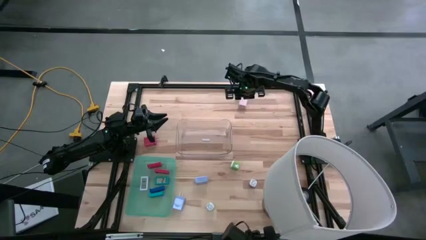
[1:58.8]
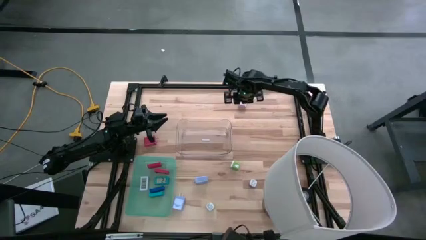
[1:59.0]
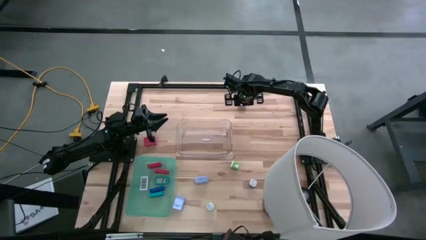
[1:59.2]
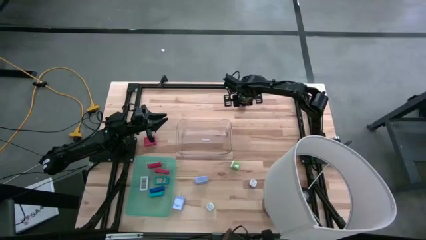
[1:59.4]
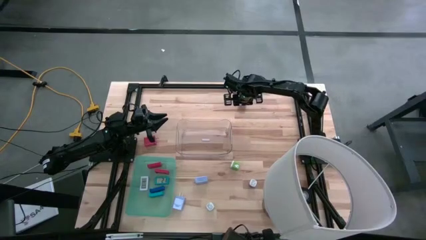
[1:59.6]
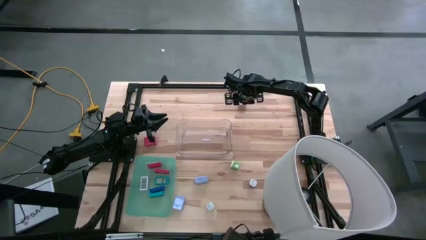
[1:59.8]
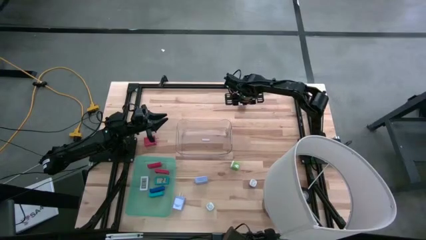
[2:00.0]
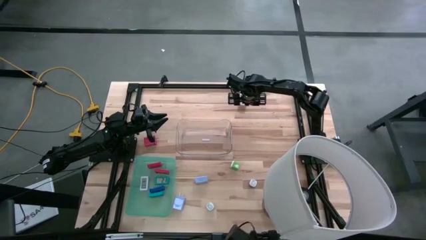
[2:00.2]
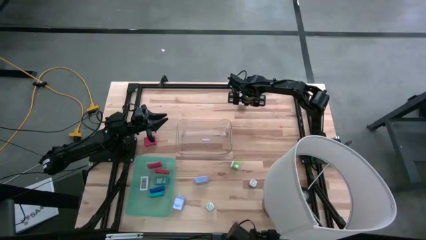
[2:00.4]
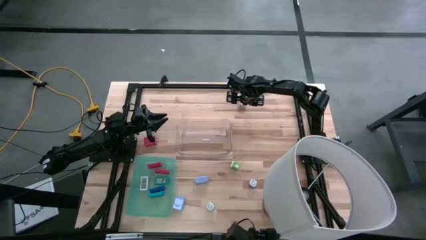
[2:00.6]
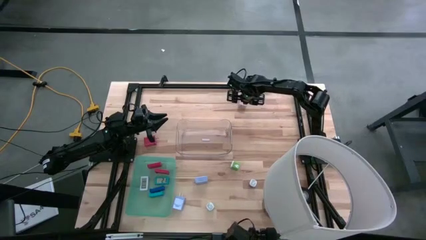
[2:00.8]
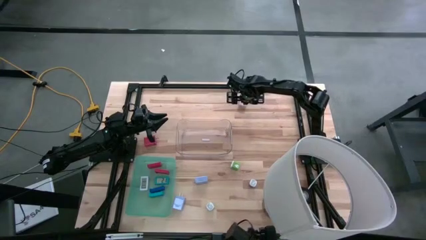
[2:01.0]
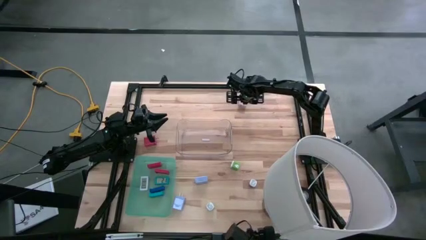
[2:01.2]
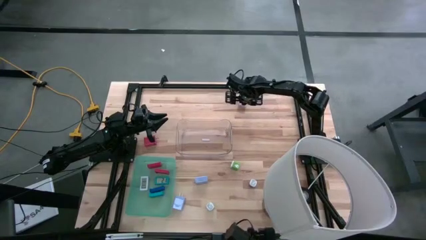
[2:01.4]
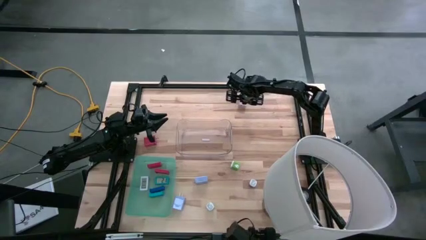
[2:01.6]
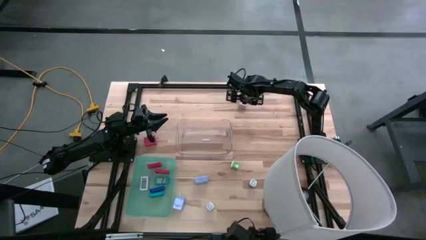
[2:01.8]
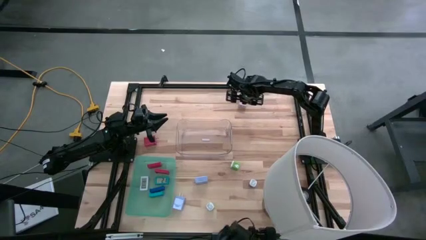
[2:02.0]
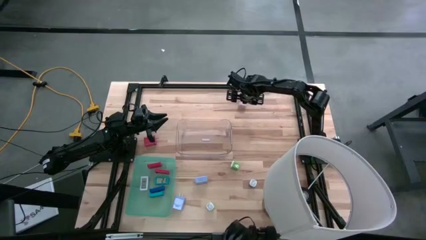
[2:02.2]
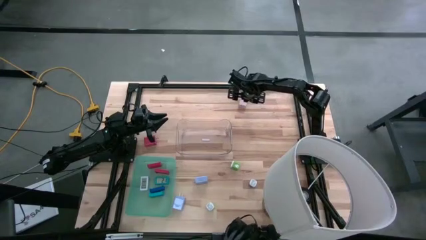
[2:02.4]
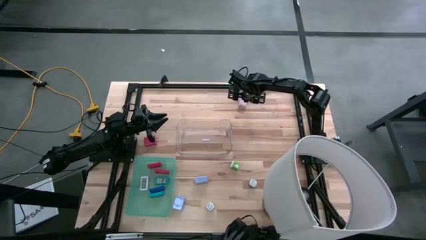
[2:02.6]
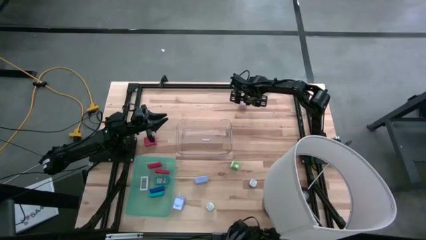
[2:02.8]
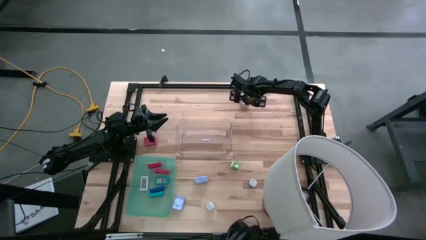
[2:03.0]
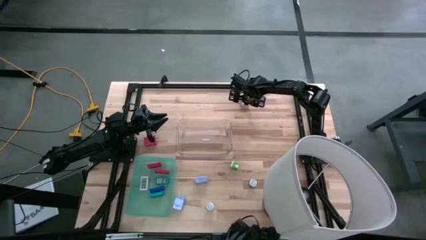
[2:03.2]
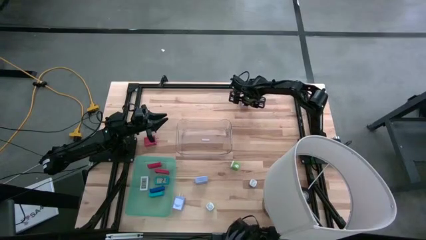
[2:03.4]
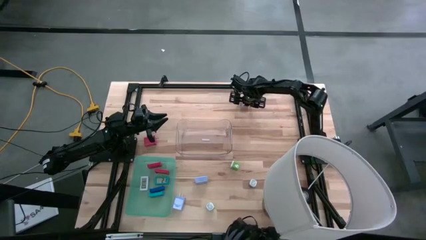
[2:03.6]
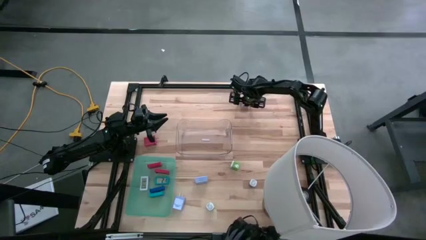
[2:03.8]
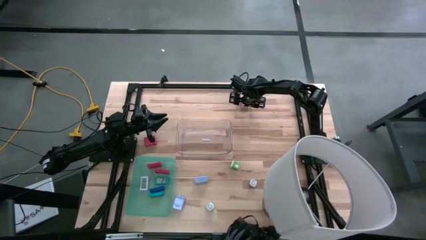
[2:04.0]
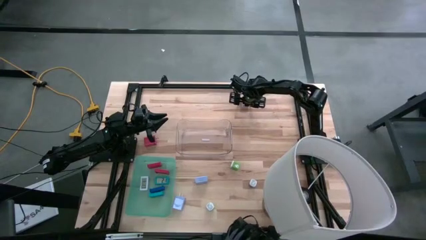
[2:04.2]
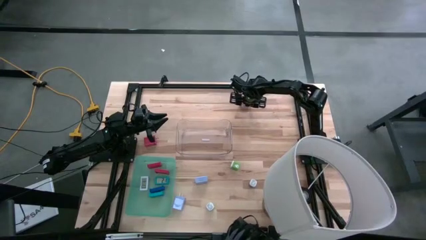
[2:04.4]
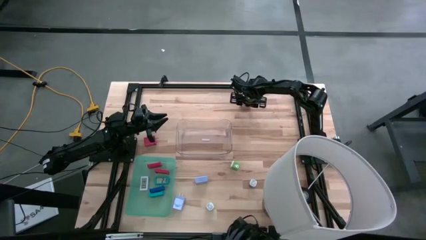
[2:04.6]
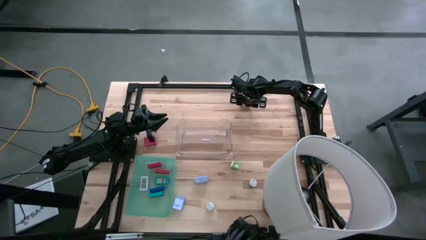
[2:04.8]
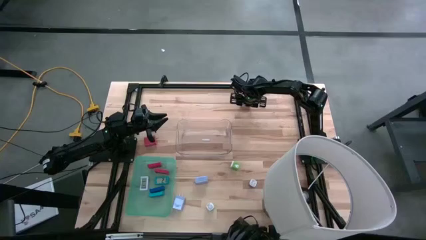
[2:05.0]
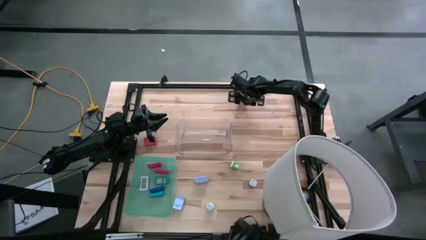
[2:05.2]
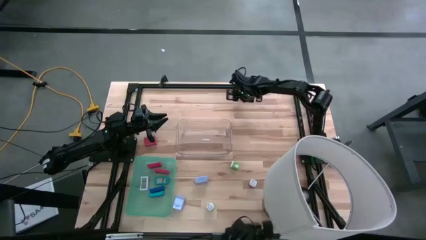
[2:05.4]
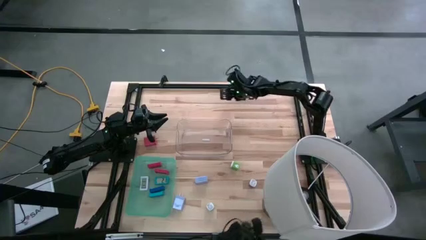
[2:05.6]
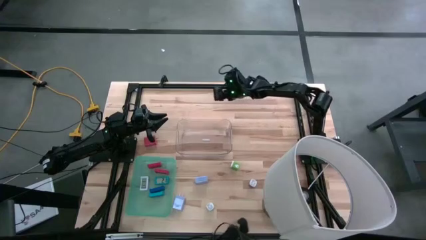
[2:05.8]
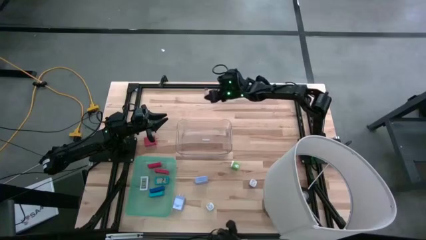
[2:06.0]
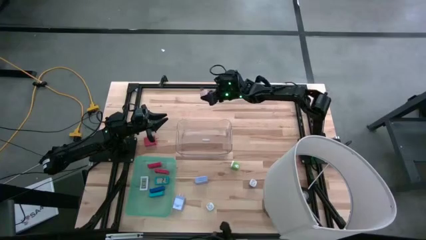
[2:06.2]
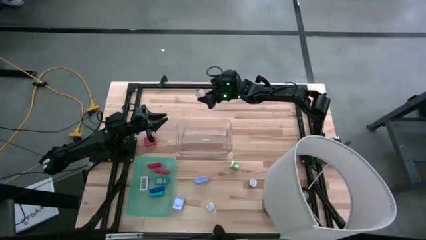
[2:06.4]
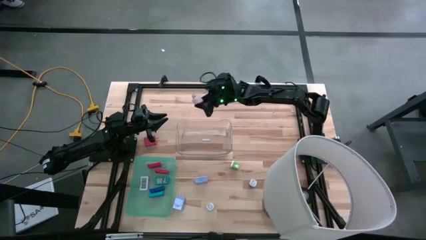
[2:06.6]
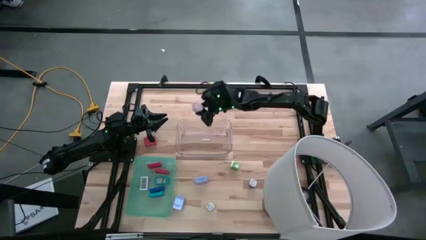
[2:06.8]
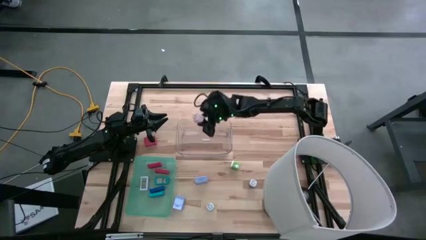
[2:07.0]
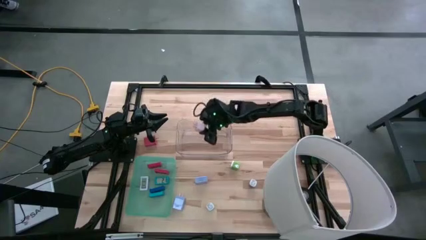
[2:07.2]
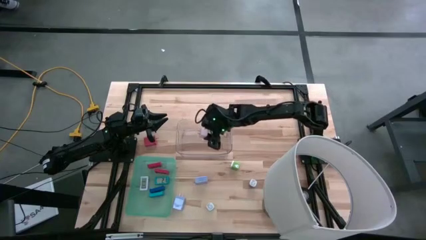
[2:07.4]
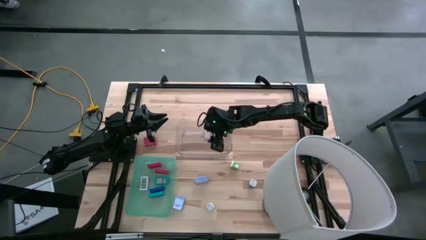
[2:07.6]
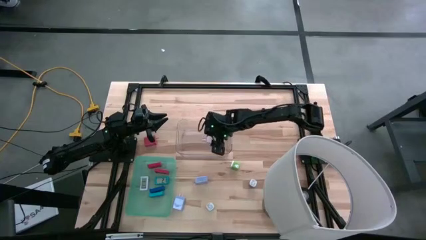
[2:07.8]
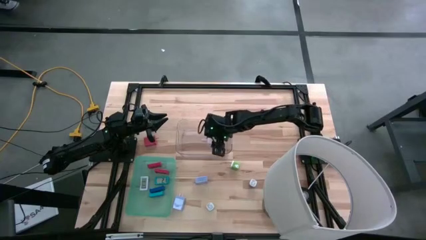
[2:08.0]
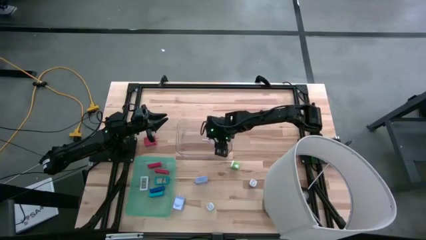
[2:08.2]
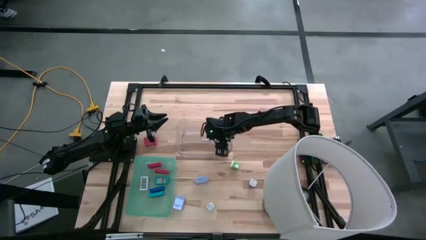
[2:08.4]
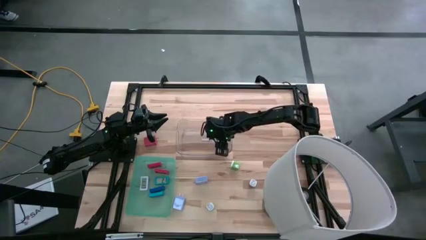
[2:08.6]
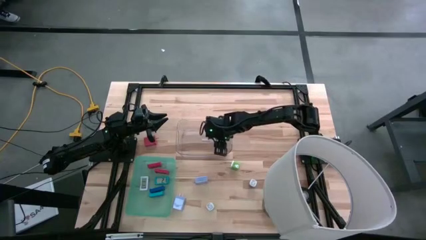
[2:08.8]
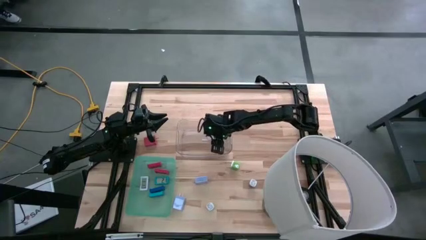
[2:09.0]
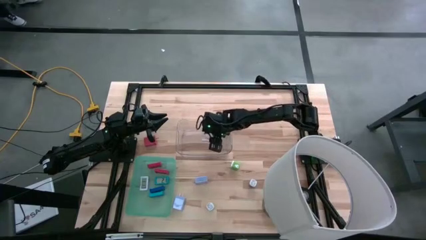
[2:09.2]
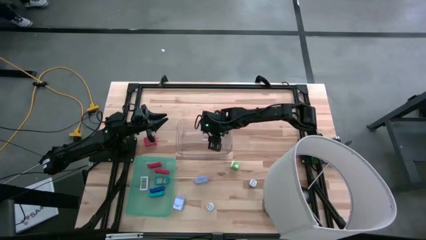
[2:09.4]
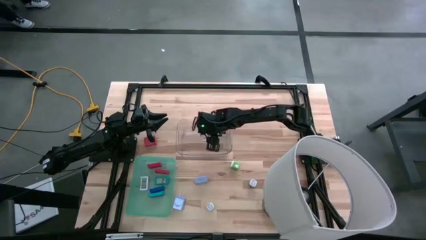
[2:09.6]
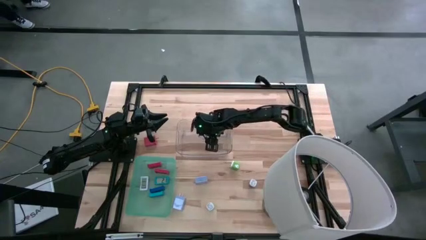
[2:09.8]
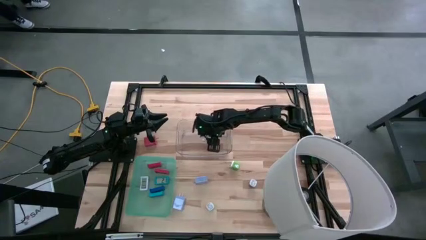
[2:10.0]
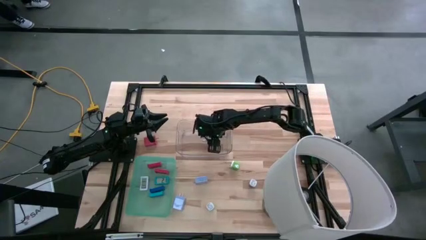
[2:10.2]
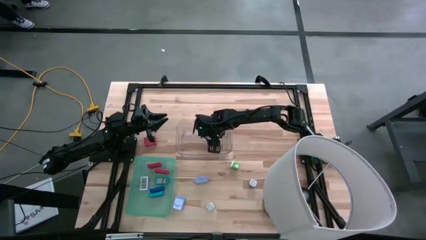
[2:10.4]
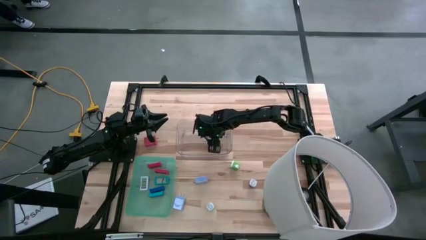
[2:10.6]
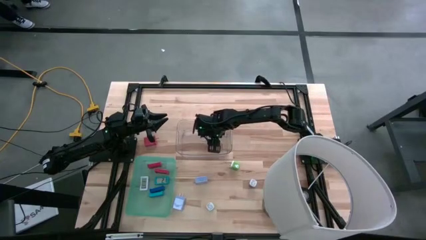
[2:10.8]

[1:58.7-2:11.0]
Task: Pick & Place Office items
Put the pink charger adapter into transparent bin

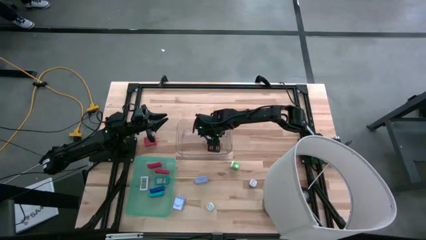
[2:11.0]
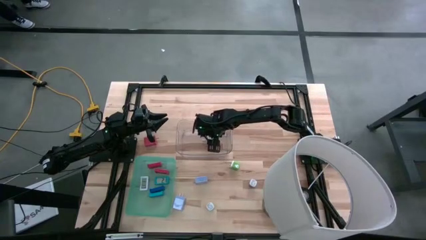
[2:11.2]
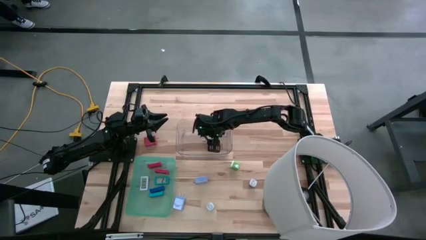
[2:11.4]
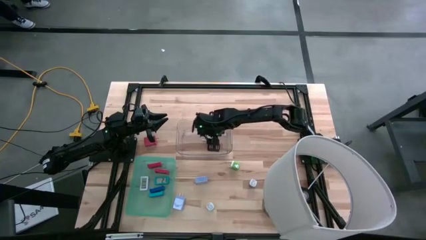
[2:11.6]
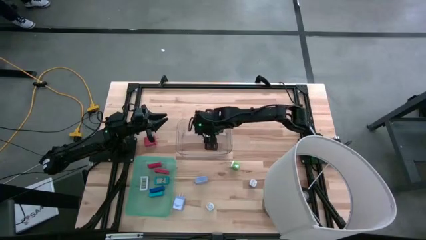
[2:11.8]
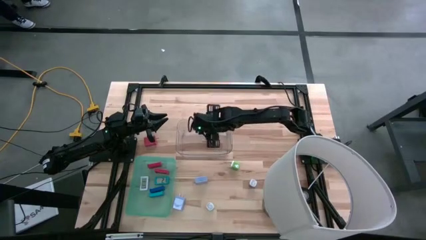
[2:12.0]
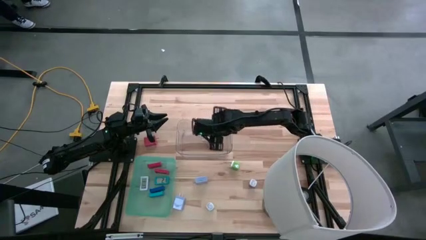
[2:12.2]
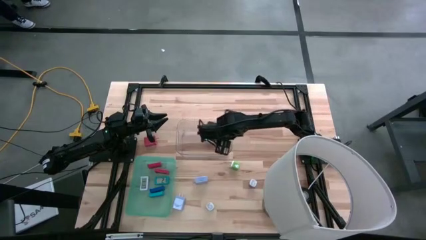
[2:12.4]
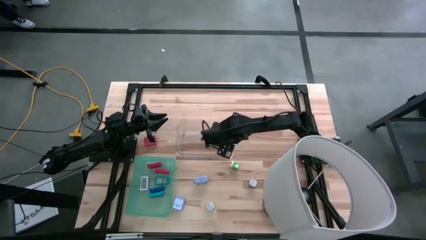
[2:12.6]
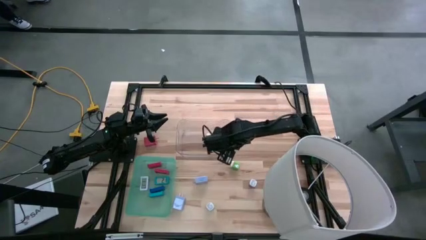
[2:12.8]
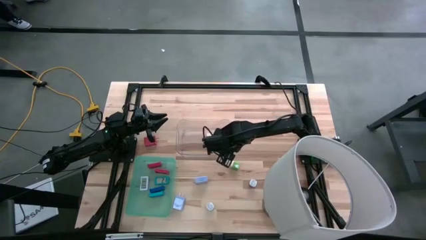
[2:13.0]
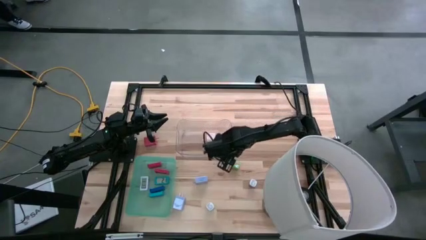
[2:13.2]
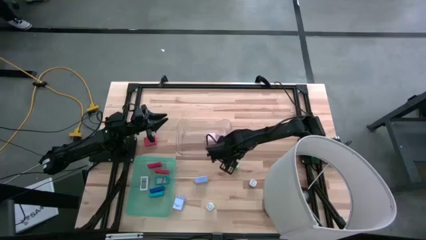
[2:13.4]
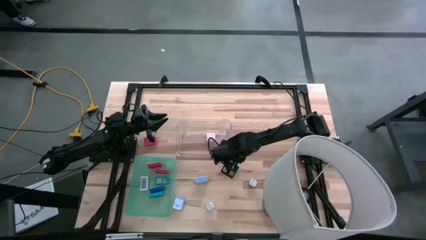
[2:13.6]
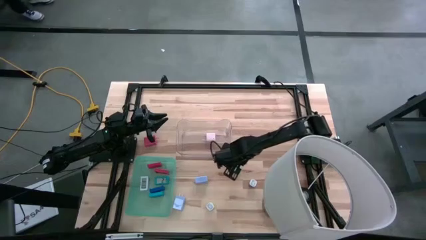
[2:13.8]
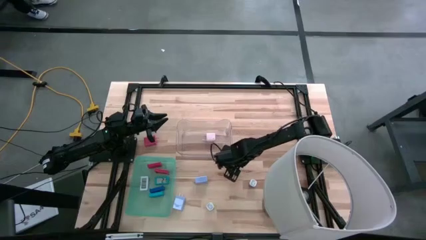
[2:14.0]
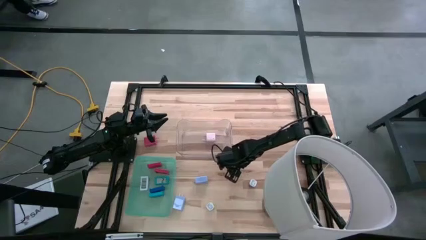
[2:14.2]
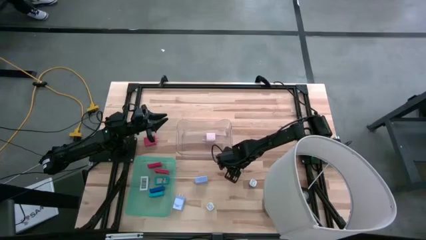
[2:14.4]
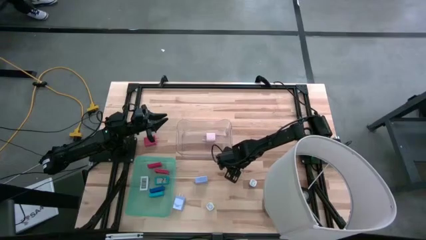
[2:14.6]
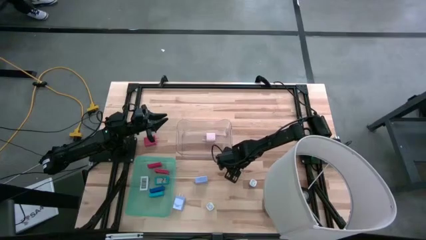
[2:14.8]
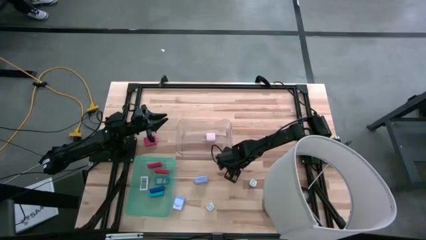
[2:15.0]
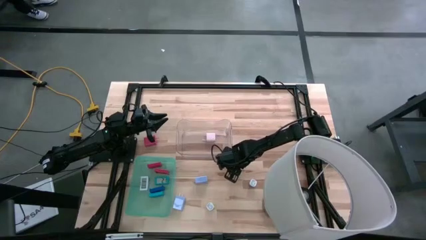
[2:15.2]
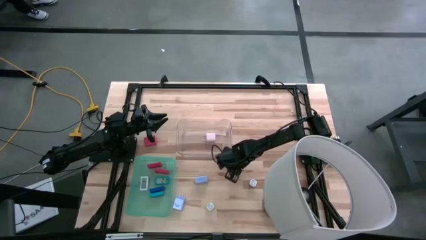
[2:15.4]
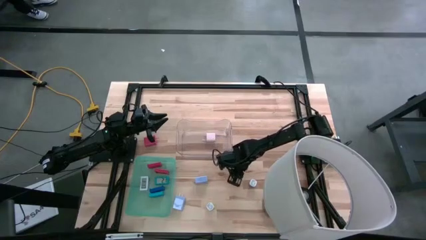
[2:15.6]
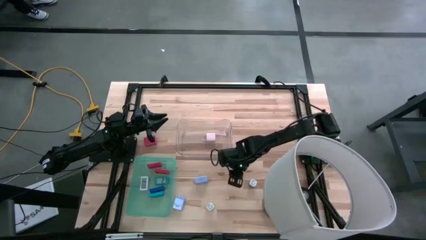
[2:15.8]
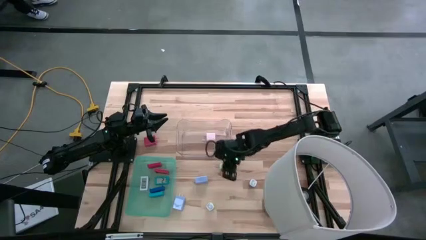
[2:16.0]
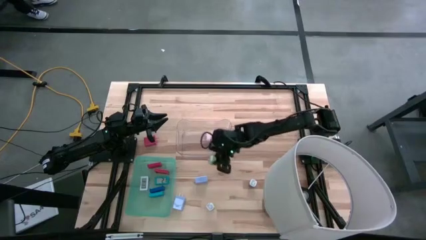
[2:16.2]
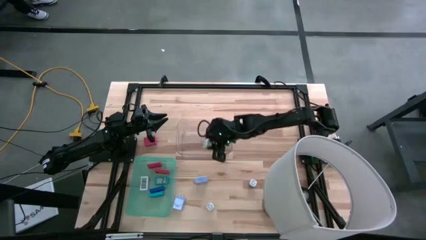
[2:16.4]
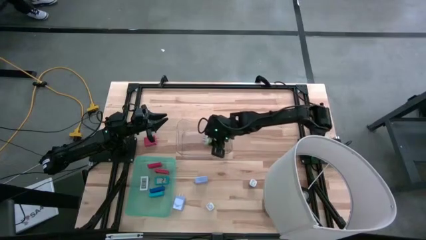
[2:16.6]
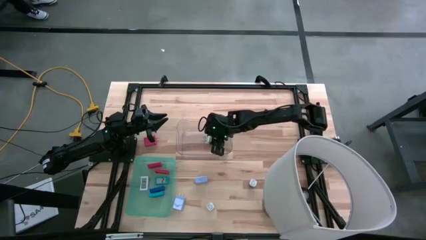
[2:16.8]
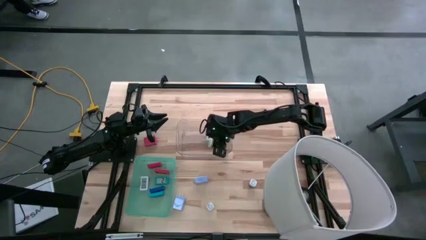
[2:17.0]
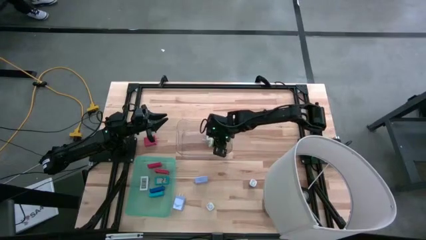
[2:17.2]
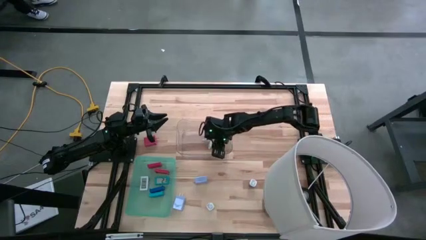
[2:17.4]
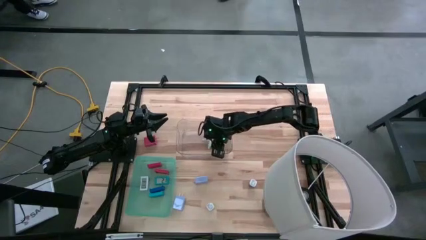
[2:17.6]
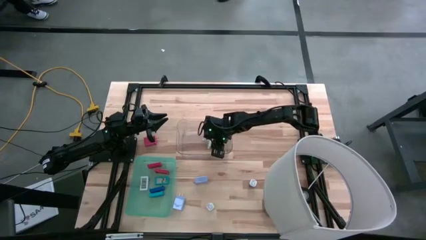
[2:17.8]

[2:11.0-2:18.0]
Put the top green charger adapter into the transparent bin
